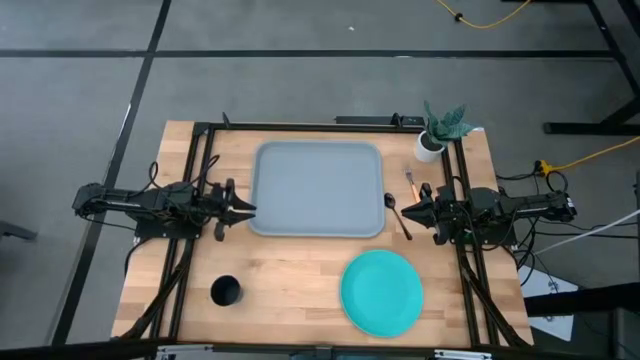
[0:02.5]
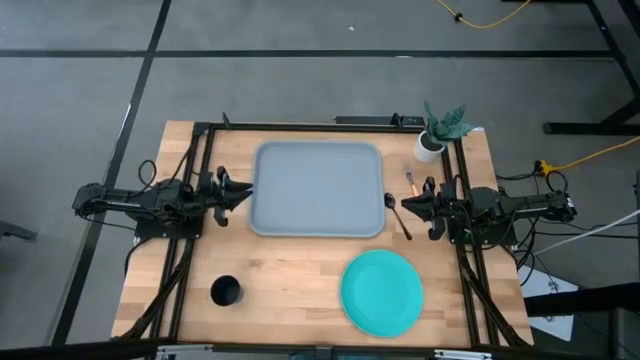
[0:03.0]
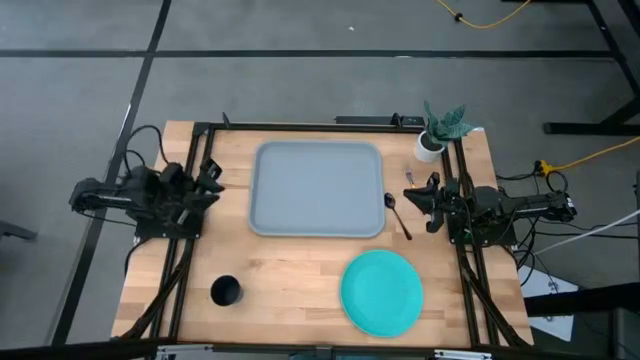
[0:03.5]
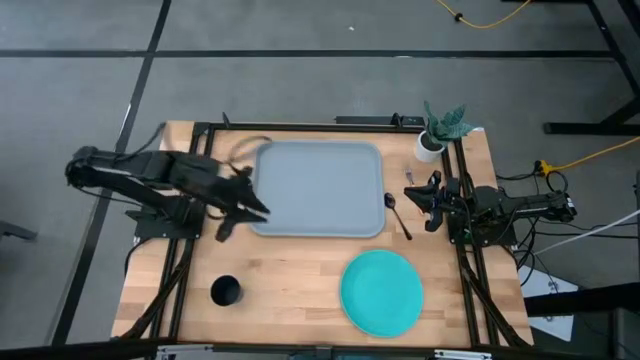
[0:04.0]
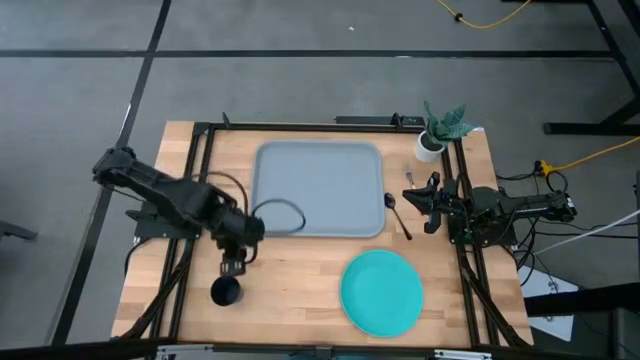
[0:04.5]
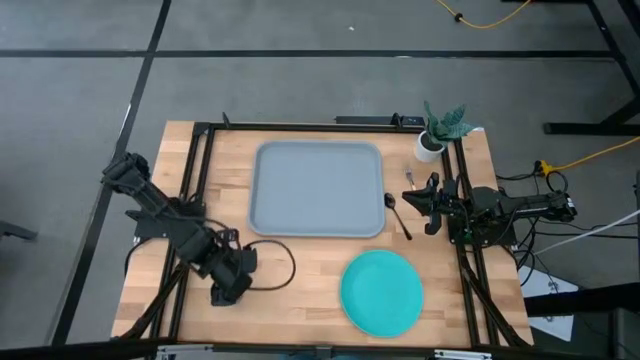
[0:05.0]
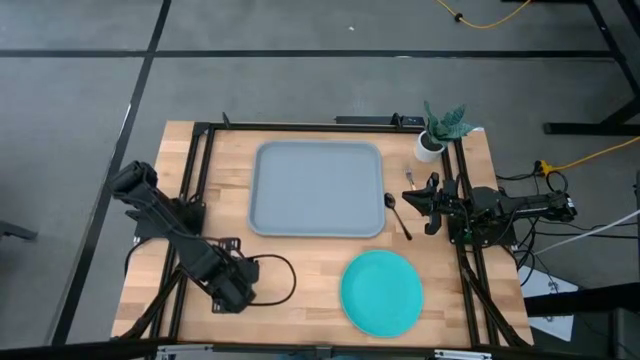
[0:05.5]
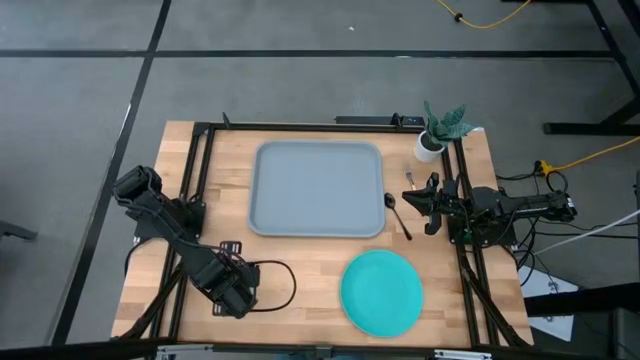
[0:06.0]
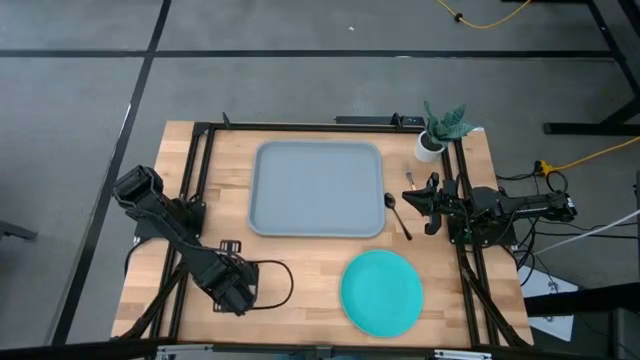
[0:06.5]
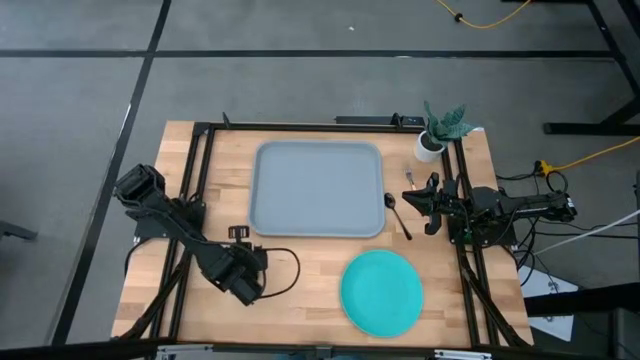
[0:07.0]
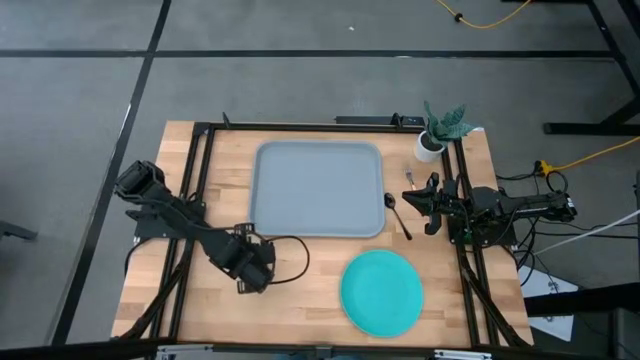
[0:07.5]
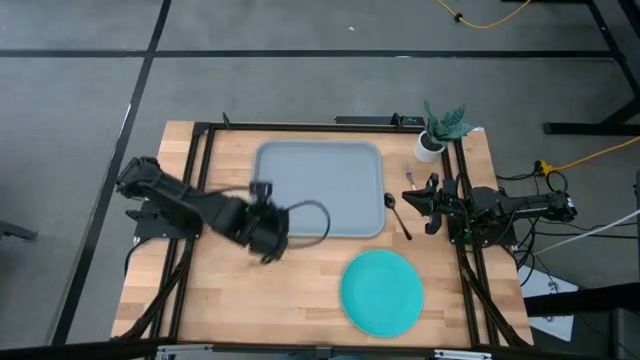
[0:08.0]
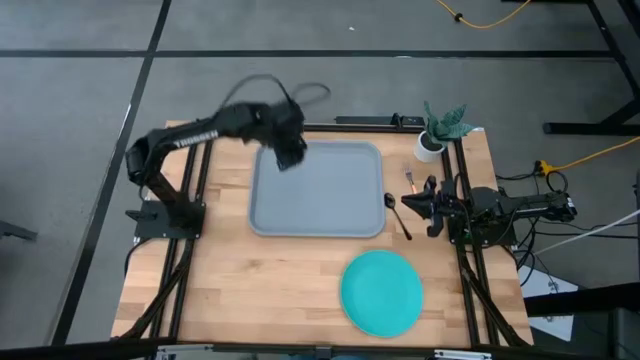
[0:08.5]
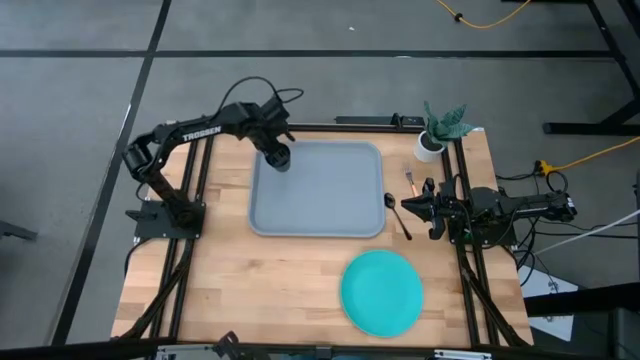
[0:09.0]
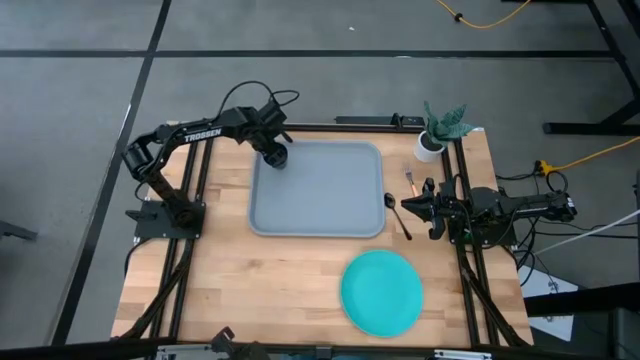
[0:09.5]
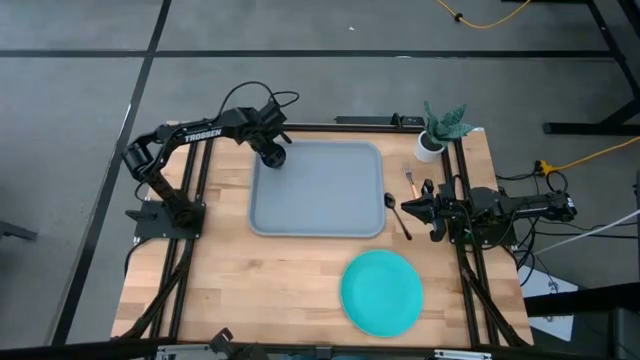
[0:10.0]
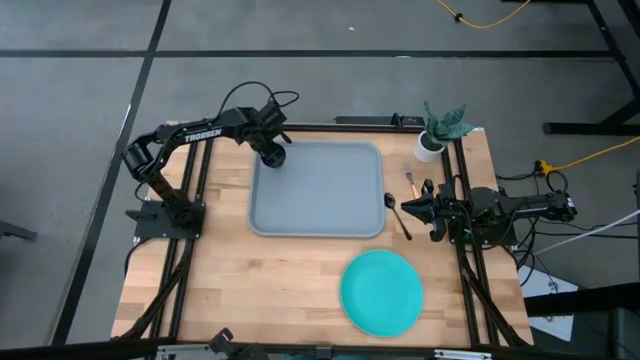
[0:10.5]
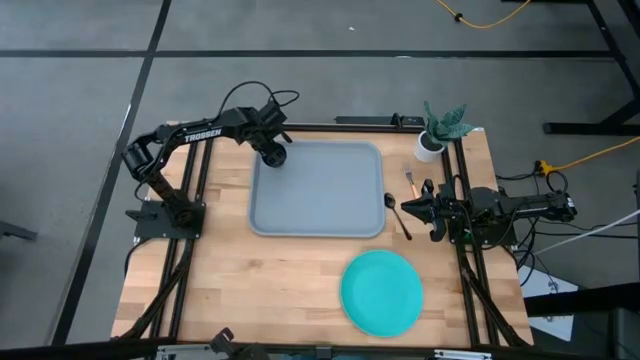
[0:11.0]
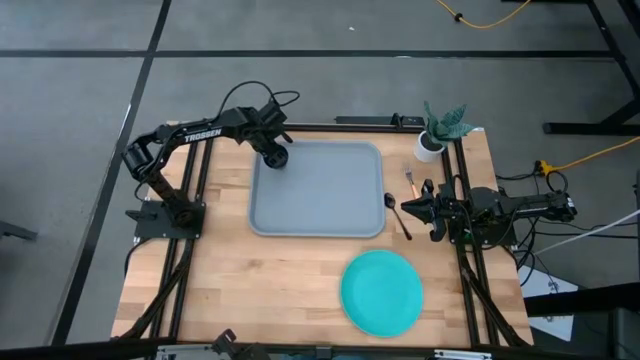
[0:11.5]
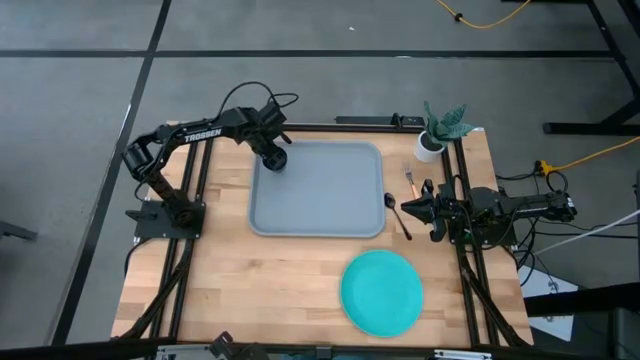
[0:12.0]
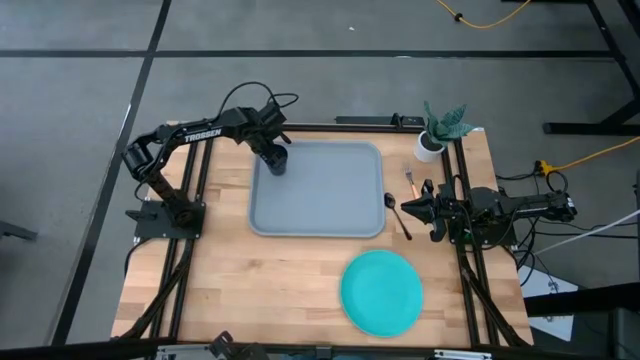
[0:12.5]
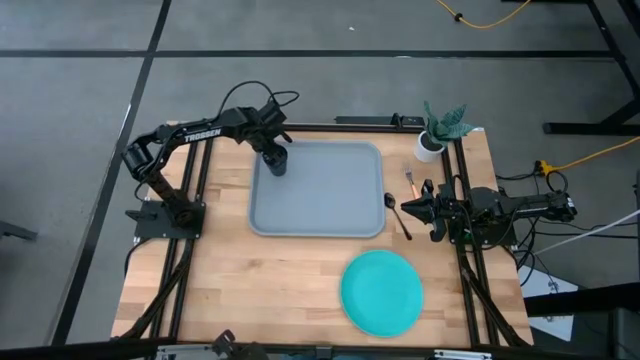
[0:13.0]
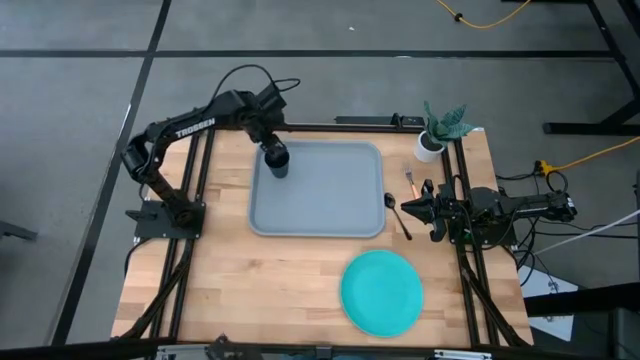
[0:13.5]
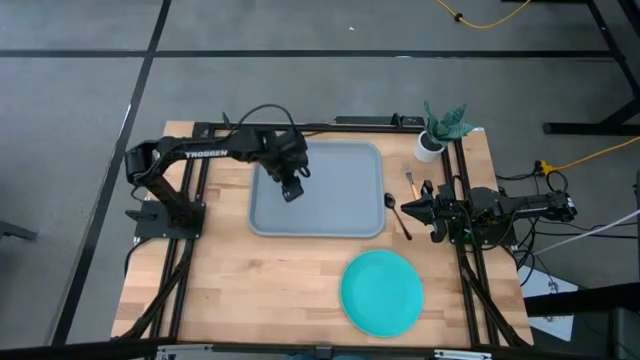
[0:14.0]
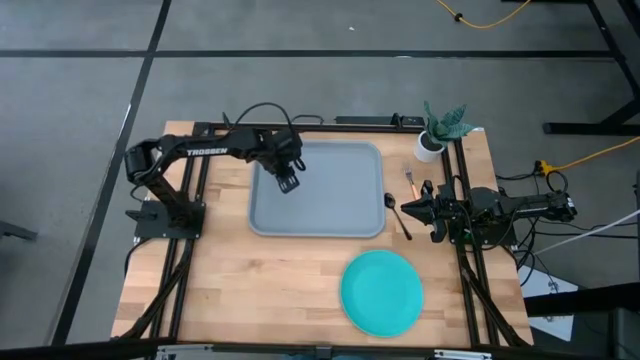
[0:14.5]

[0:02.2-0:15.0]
Task: Pick and place plate/cup/fork/spoon on tray
Put the black cup to the top left of the serving tray

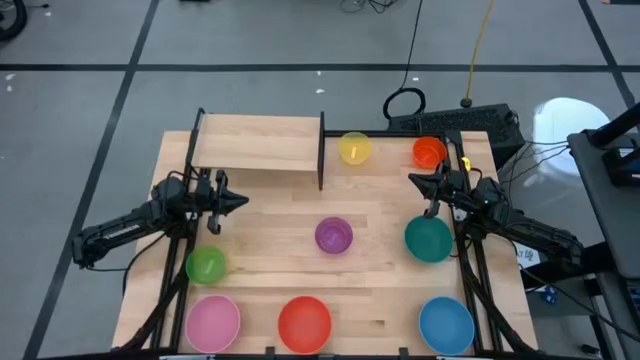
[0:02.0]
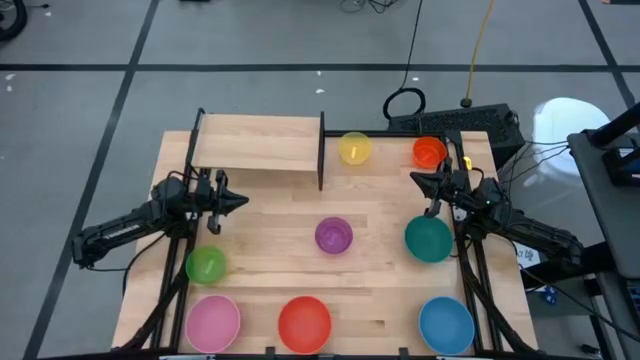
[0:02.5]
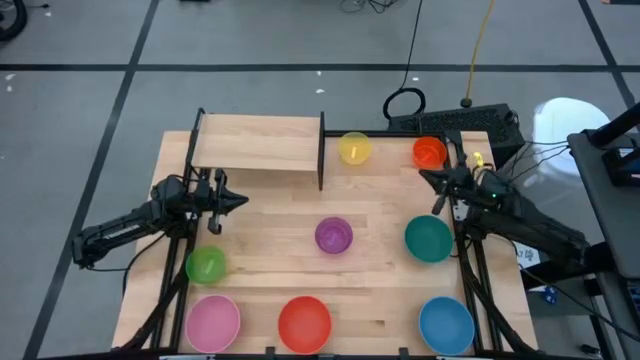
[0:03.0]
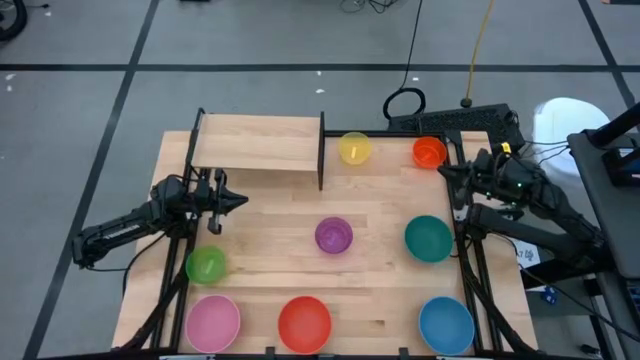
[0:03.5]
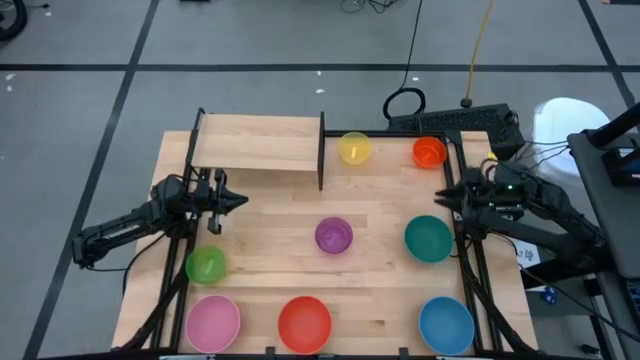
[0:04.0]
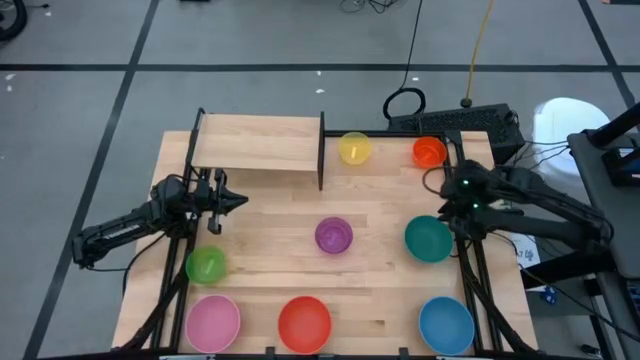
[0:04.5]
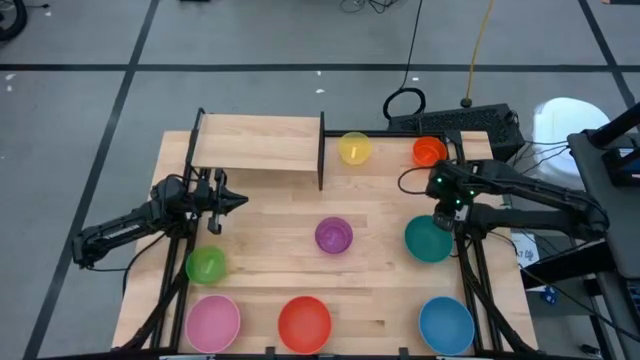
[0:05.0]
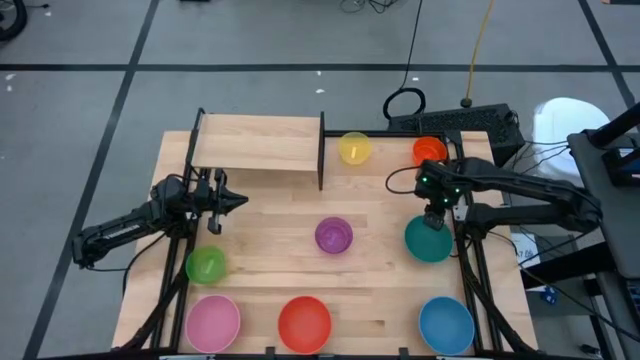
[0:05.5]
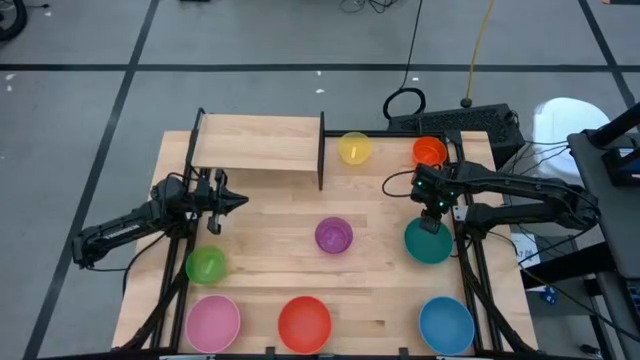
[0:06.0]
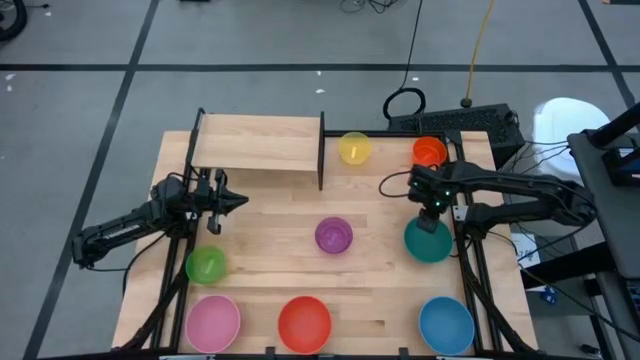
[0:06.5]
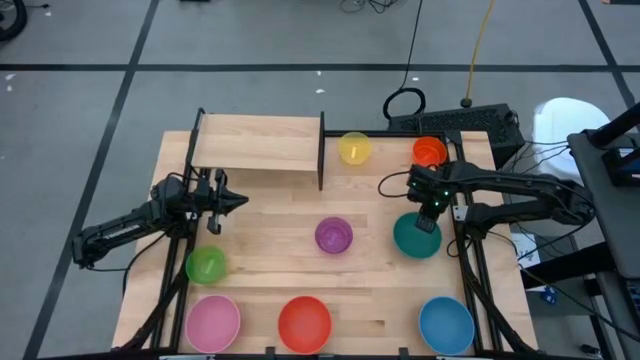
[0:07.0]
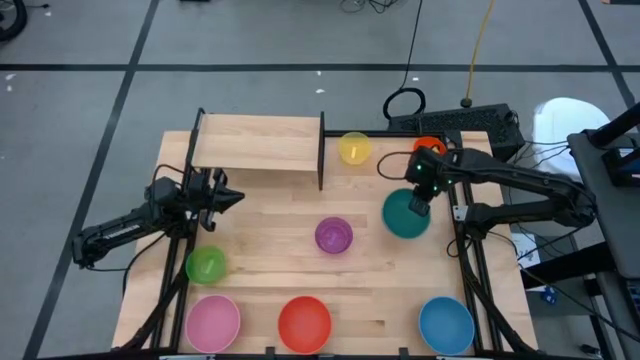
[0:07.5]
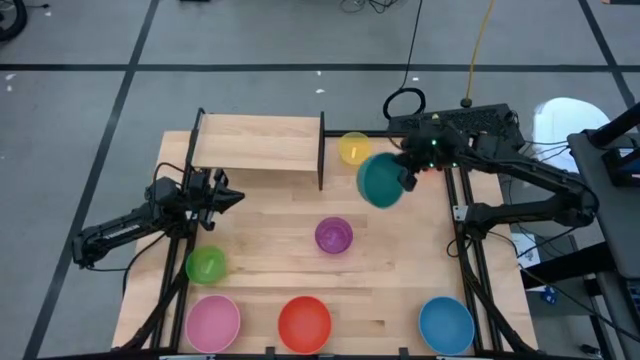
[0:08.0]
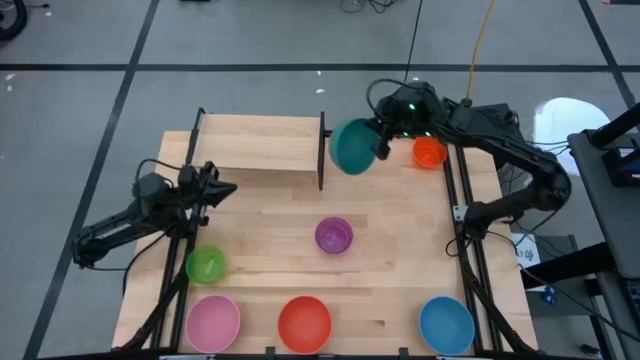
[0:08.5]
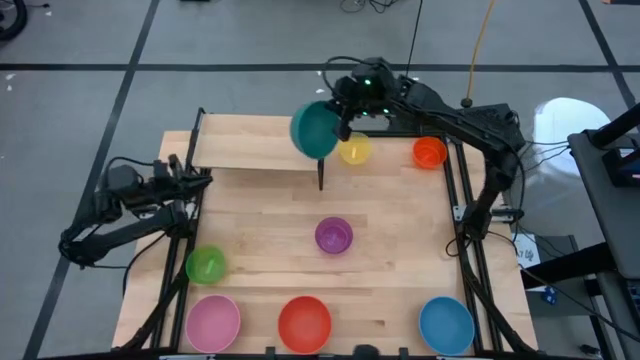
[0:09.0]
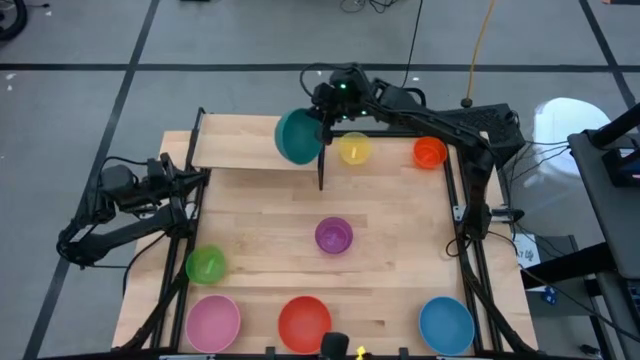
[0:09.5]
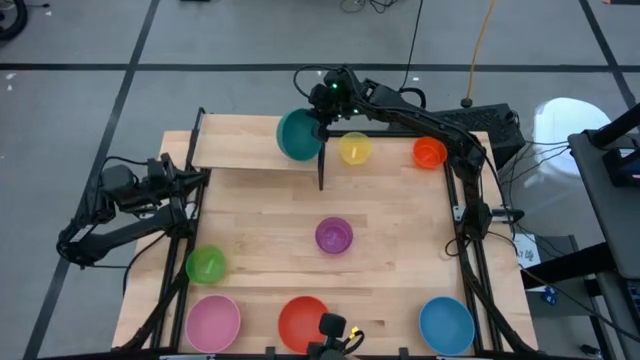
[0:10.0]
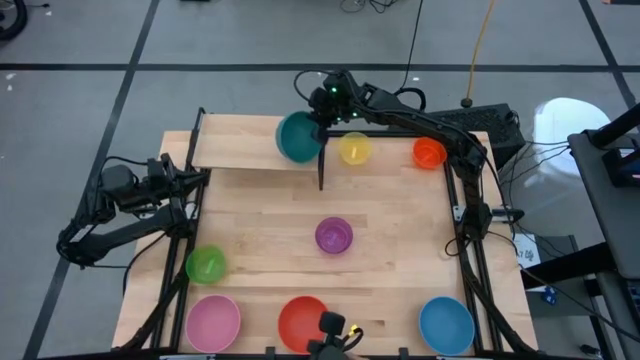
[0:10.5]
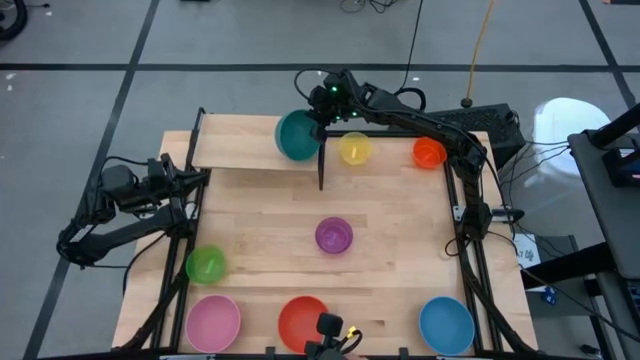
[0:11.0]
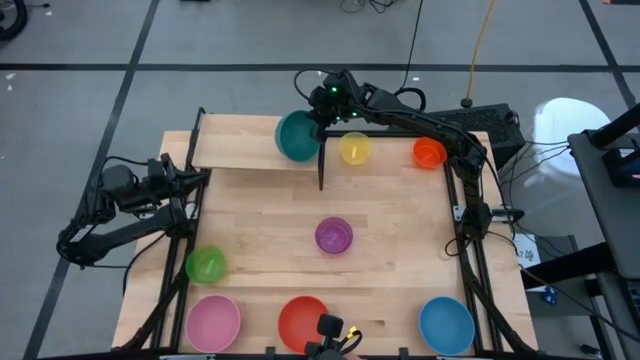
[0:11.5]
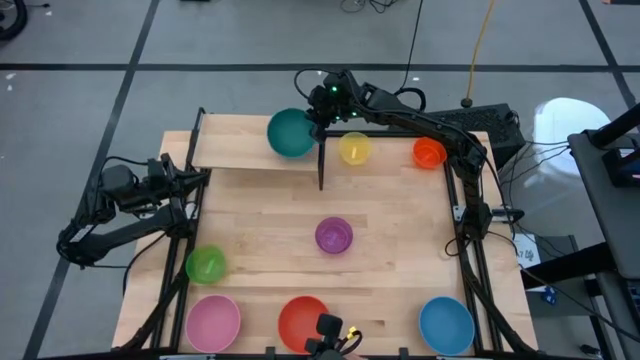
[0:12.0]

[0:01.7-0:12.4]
Task: Place and stack bowls onto a shelf
Put the dark green bowl on the shelf
